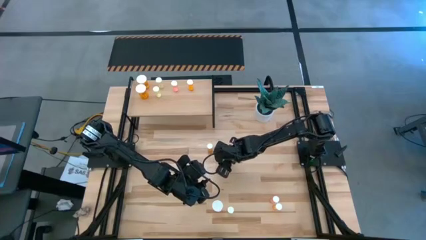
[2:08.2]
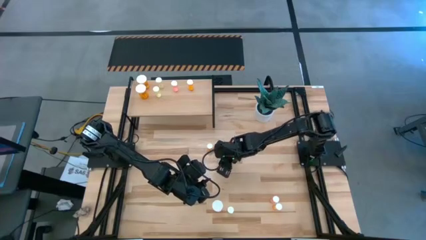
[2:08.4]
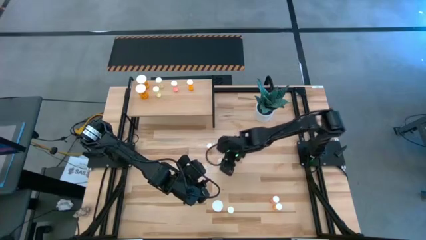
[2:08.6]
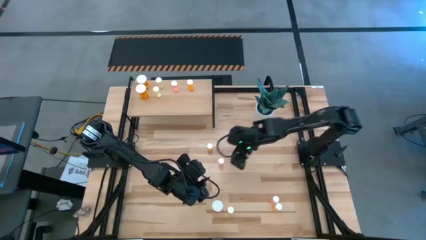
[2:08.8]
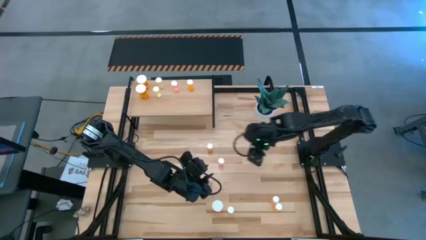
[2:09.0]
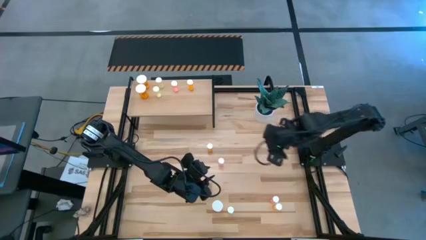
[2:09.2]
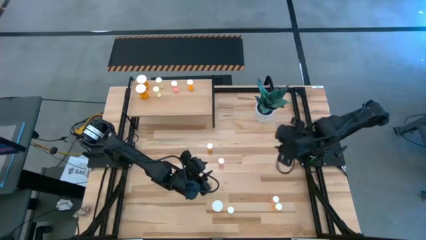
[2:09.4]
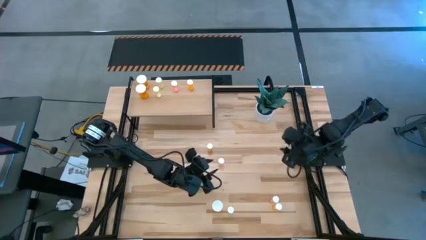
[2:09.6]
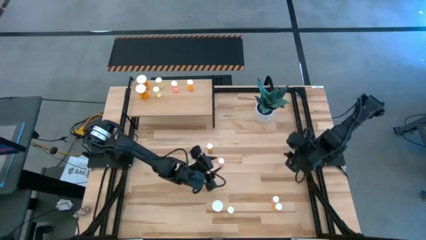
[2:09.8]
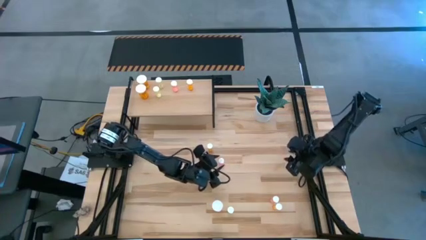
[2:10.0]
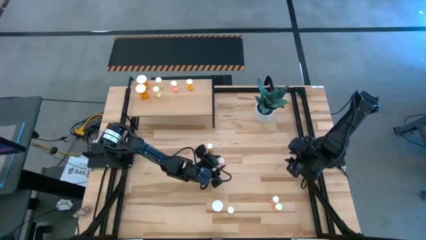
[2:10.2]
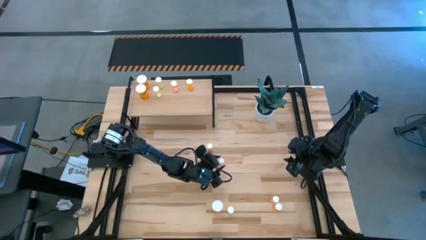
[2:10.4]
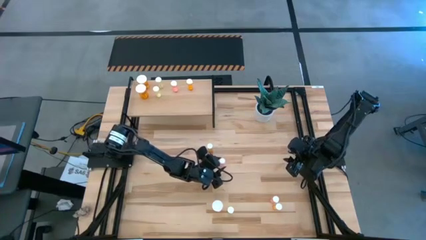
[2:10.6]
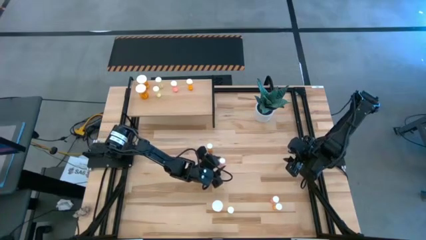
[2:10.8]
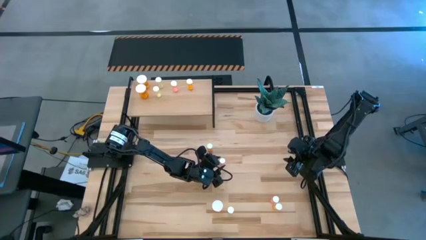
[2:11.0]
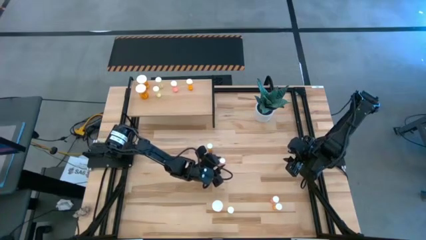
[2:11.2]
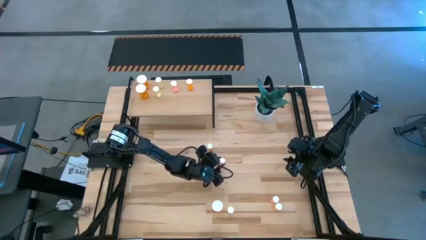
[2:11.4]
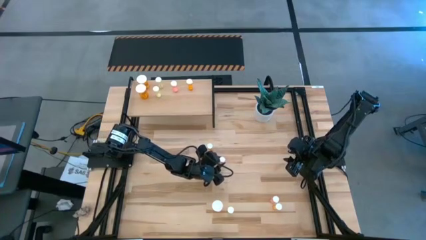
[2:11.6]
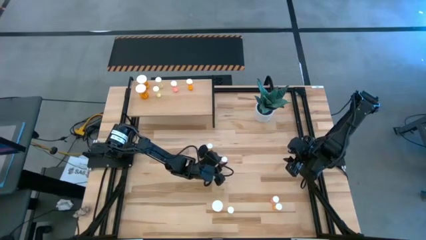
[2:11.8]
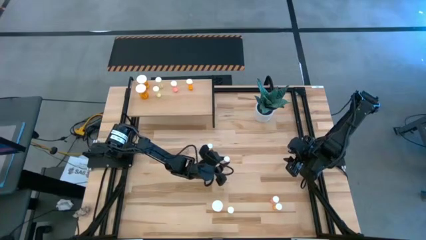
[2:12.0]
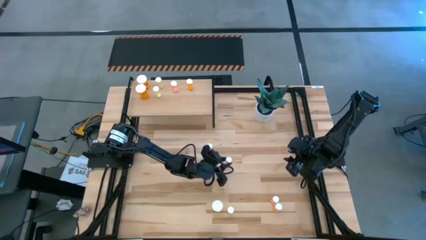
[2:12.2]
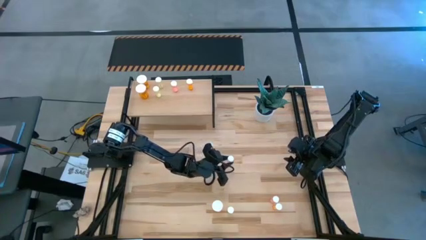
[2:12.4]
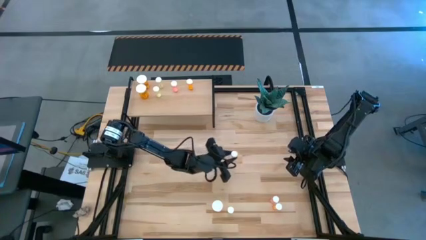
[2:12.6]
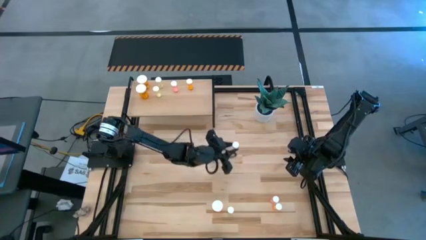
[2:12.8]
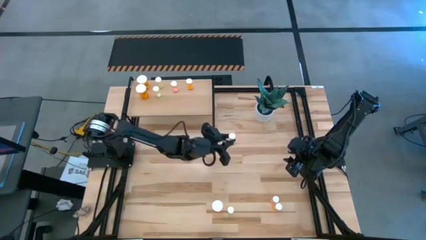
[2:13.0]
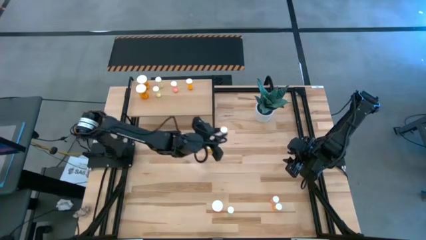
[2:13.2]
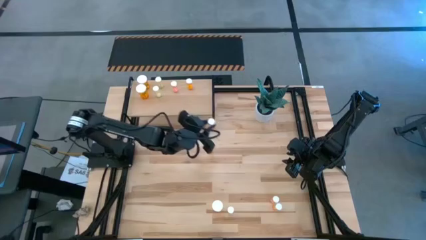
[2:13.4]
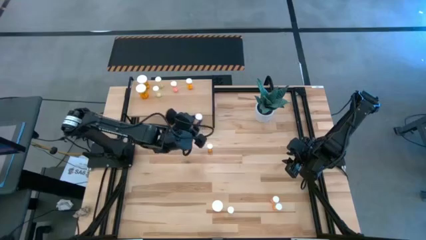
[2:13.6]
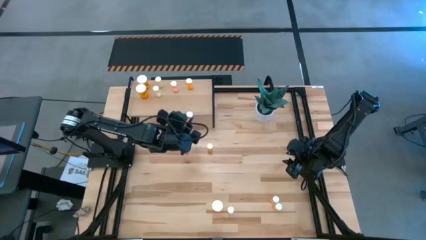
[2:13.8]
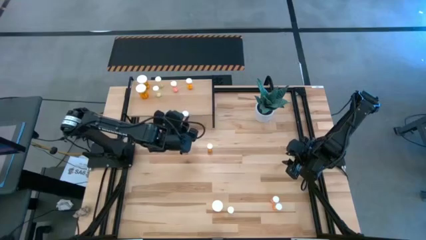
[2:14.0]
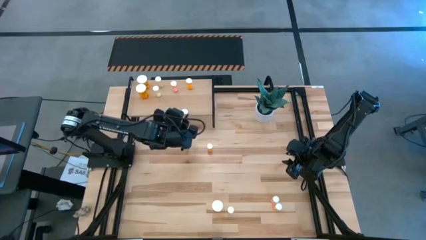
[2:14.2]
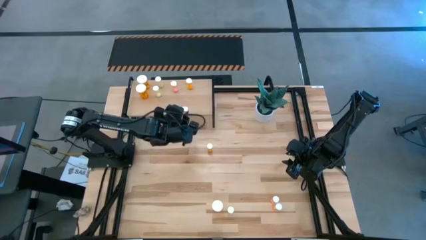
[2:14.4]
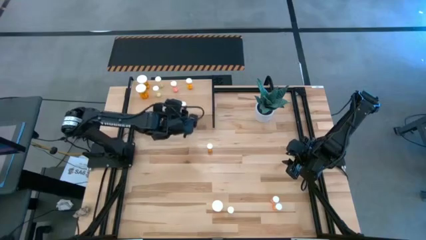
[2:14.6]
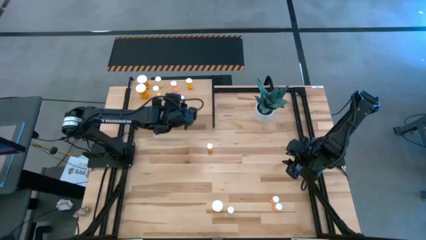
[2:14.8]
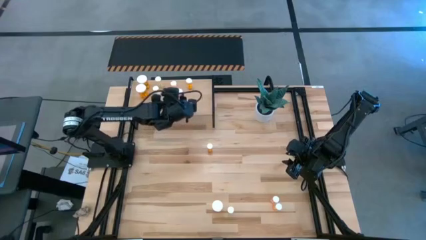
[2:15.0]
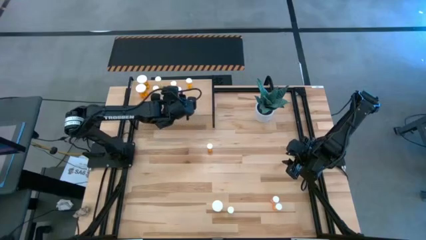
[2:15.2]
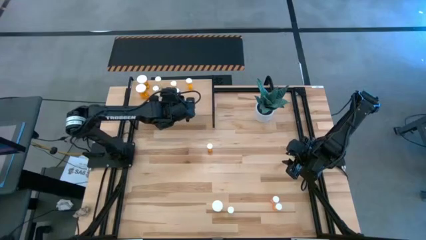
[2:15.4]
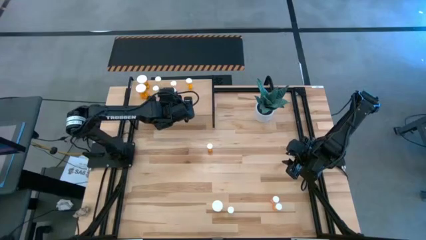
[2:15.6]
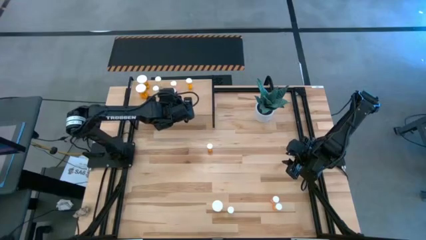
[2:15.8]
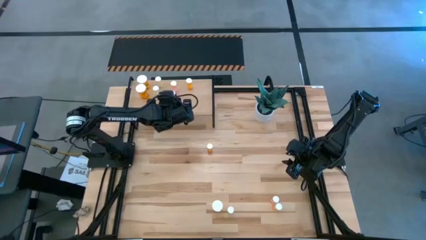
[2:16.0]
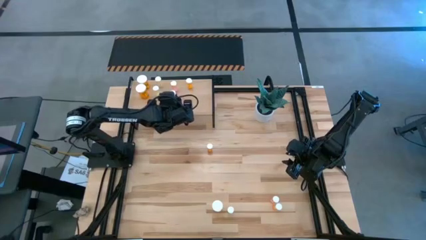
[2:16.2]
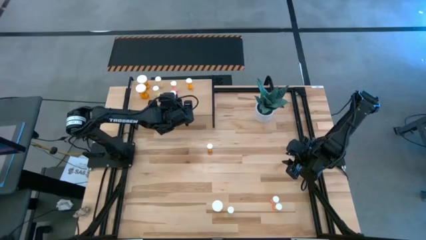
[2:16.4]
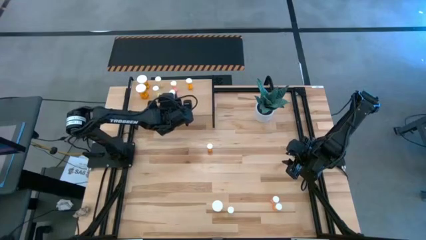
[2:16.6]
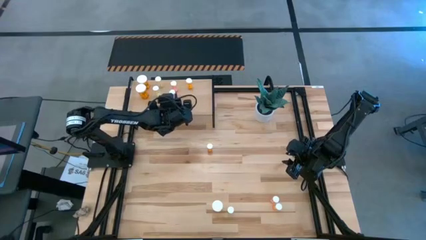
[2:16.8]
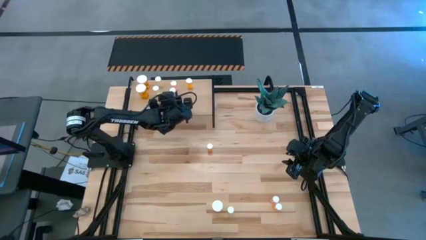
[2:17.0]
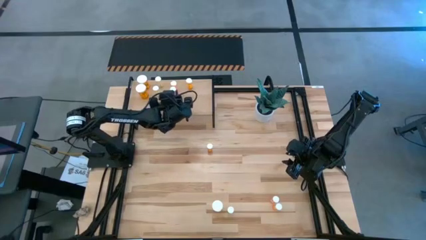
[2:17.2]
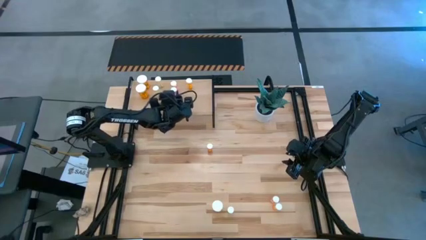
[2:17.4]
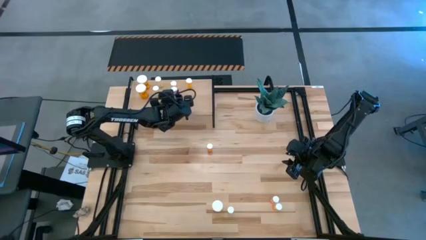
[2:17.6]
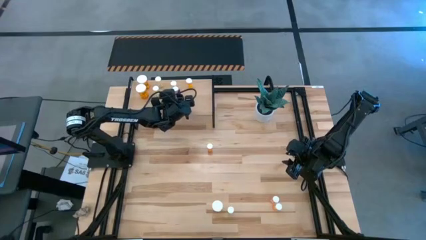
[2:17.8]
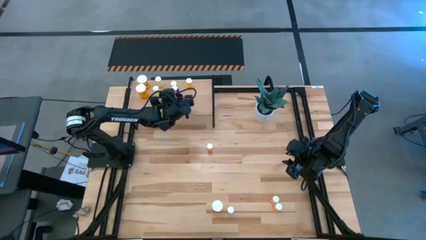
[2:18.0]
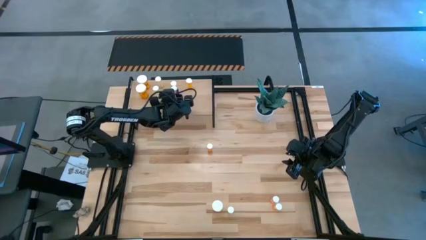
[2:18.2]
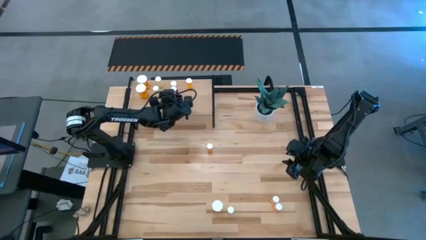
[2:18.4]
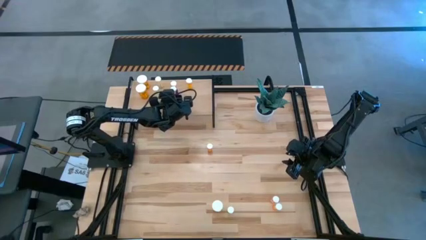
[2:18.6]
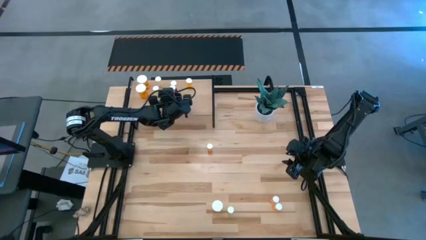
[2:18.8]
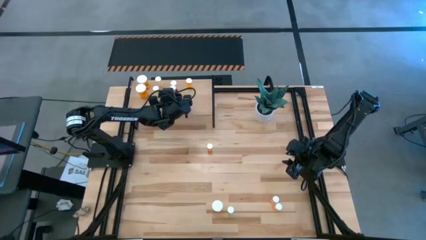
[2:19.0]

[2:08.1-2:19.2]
Task: Pick and place medicine bottles onto shelf by color
Put the right pink pill bottle on the shelf aligned with the other pink pill bottle
